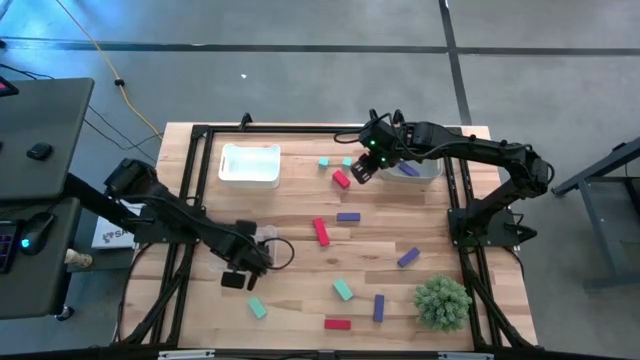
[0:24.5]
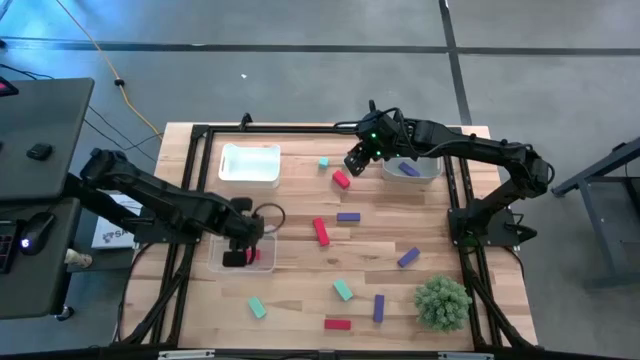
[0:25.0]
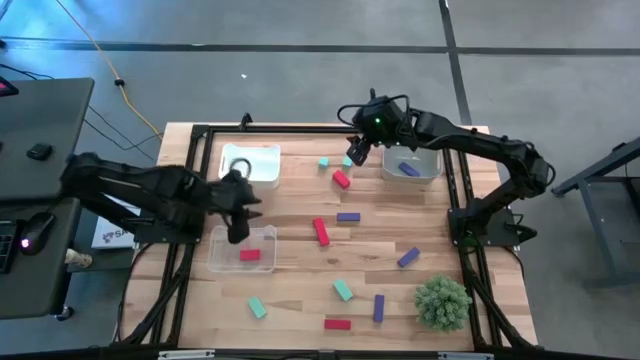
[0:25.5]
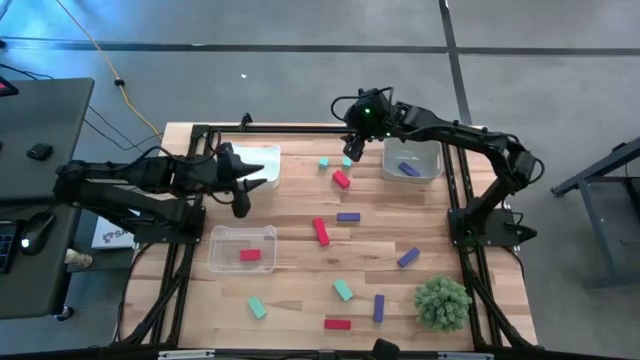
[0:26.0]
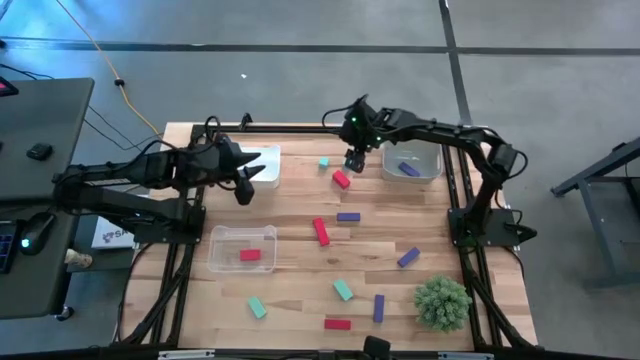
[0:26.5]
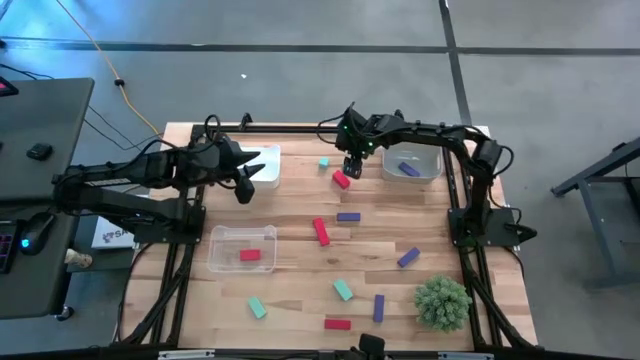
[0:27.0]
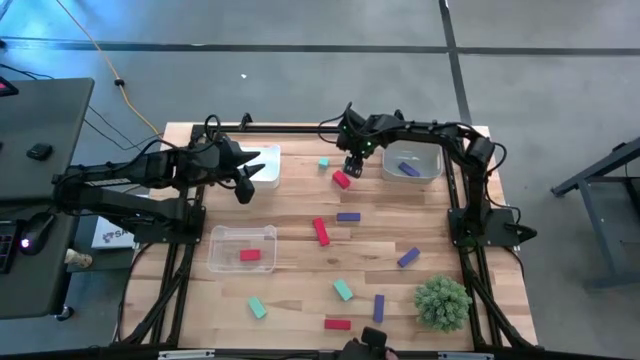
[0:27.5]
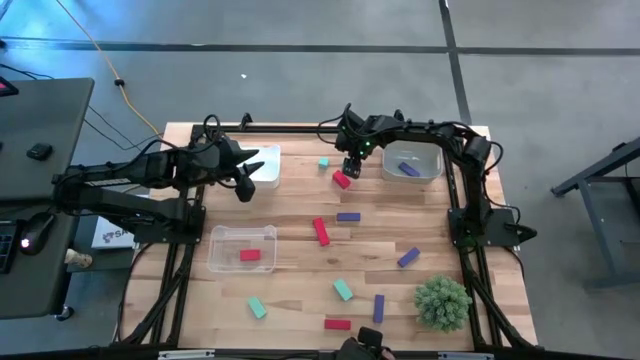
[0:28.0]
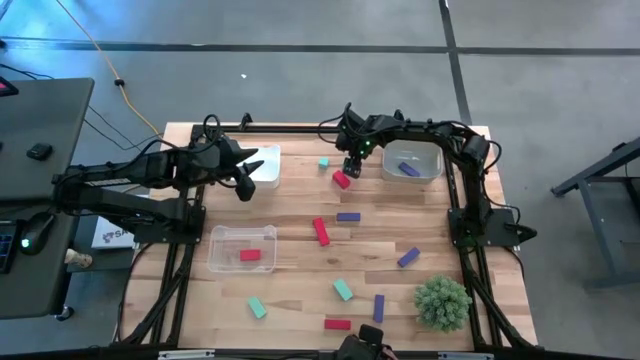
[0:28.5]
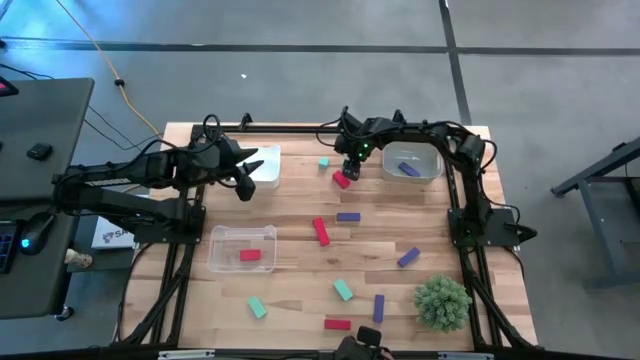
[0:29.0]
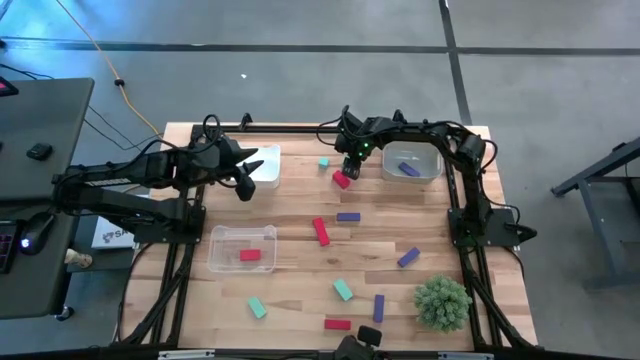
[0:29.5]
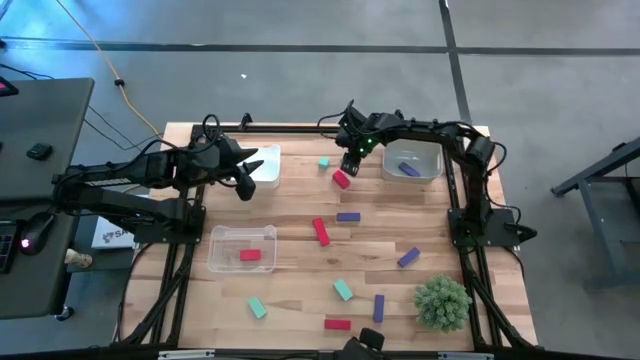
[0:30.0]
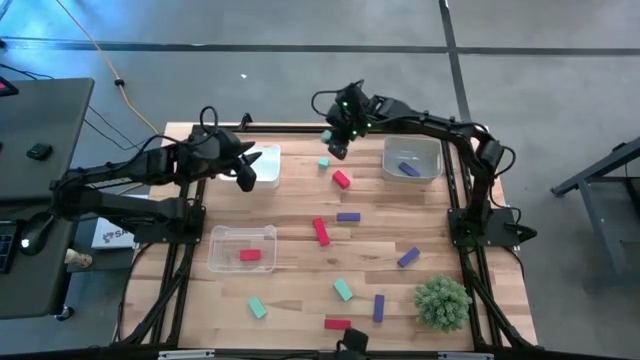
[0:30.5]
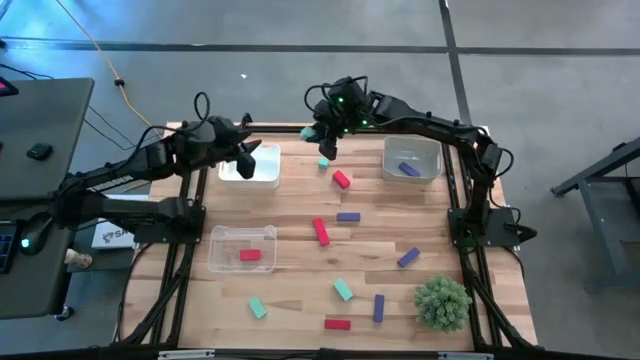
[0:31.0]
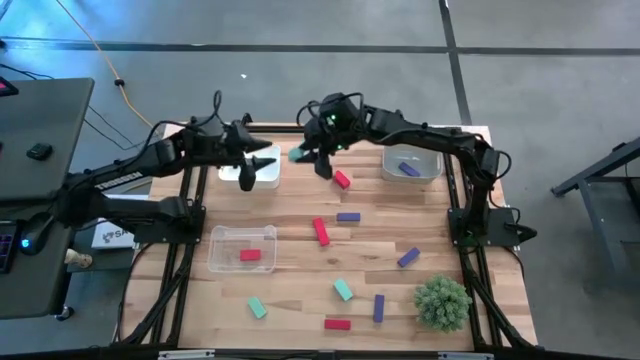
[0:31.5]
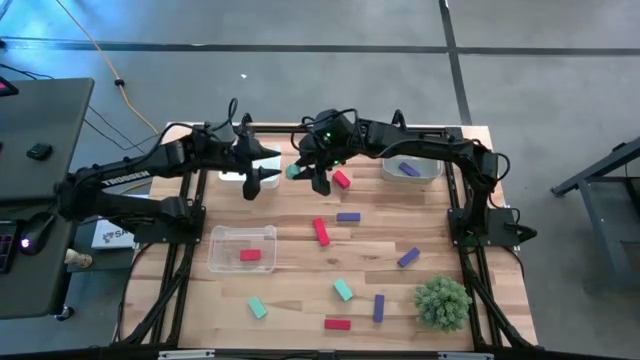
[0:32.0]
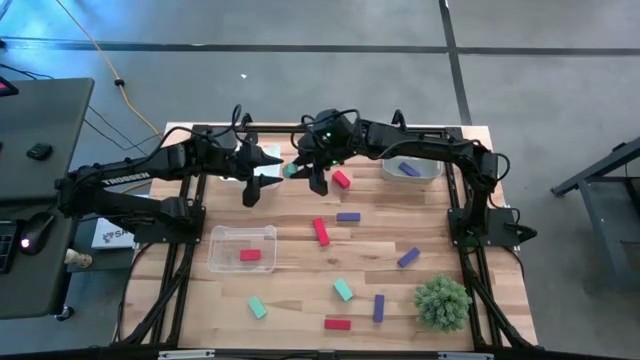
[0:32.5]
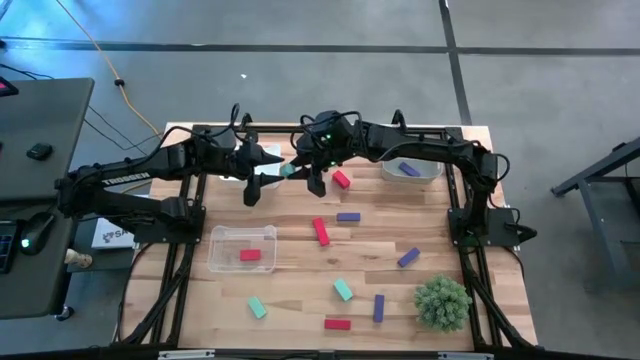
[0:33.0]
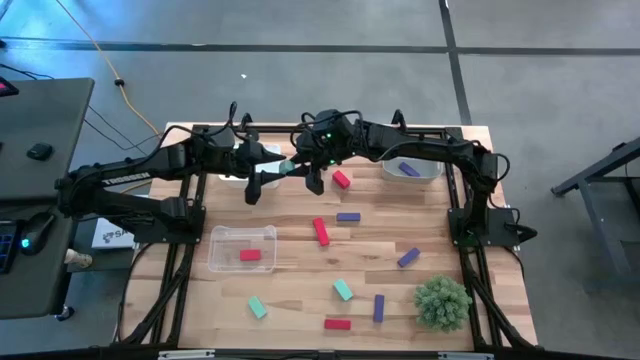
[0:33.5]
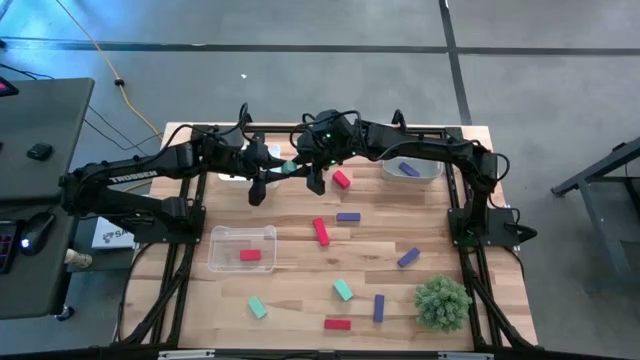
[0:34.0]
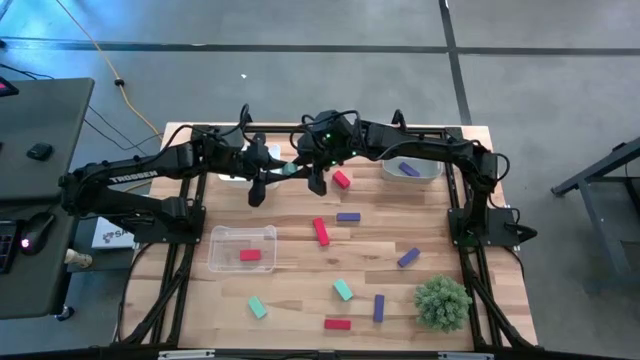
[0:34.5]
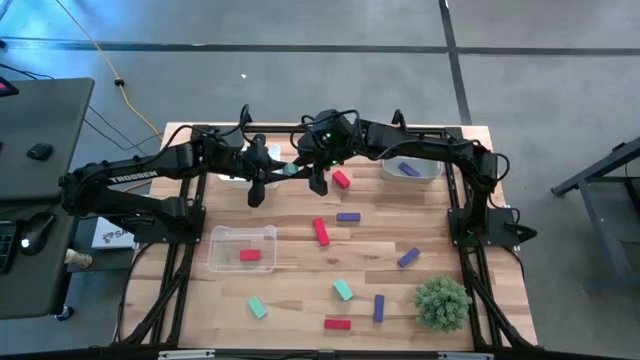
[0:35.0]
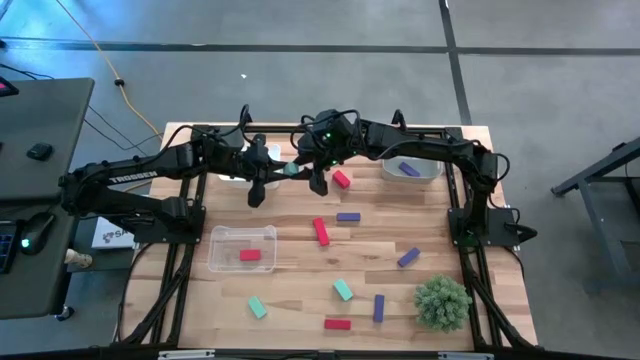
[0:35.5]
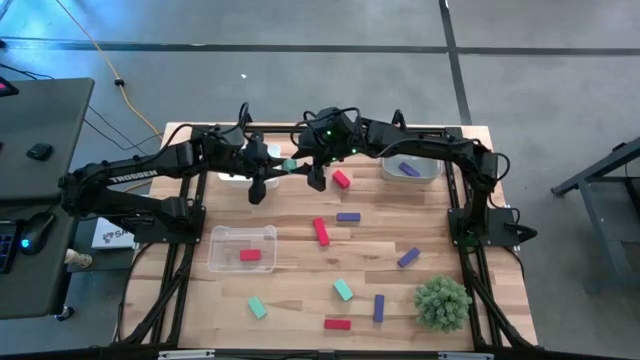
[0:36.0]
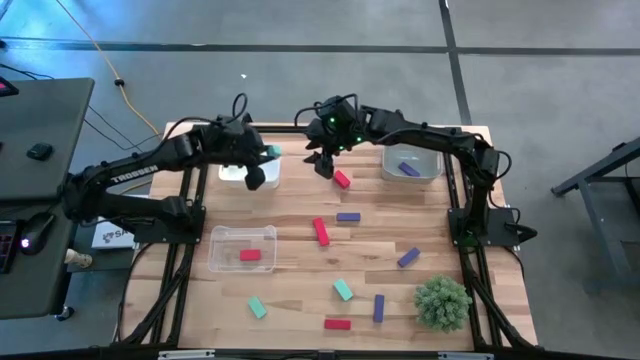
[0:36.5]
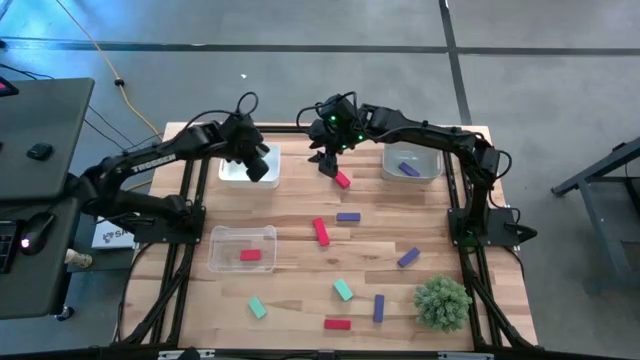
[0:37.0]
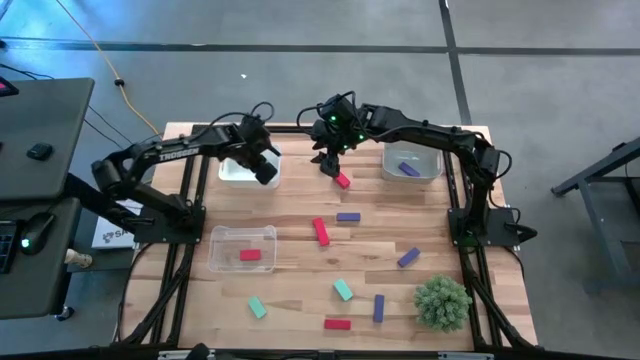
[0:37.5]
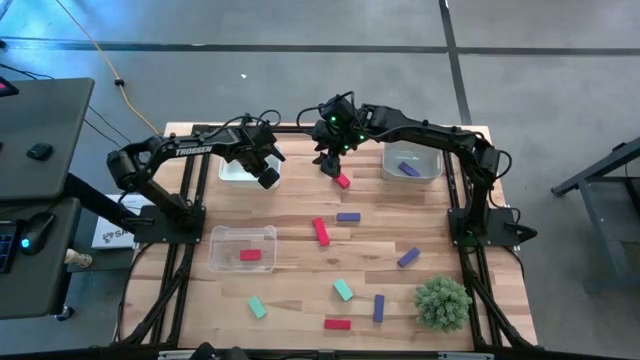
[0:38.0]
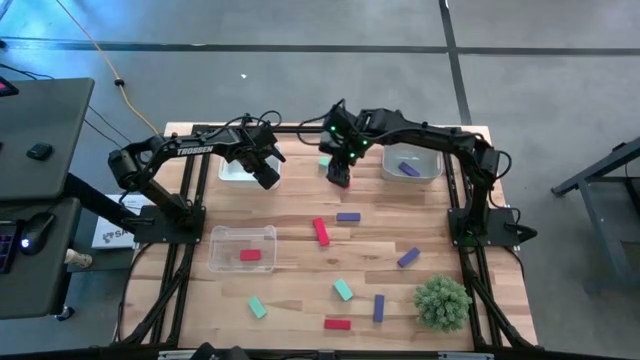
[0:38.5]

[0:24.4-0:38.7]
Task: Sort & place blocks by color
Put the top right light blue block into the white bin

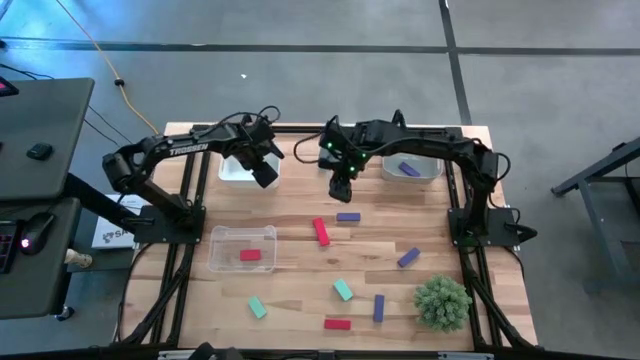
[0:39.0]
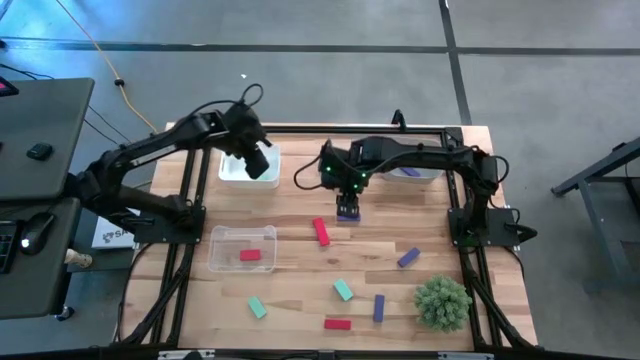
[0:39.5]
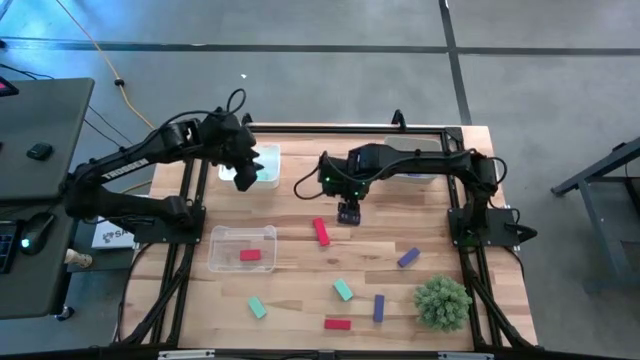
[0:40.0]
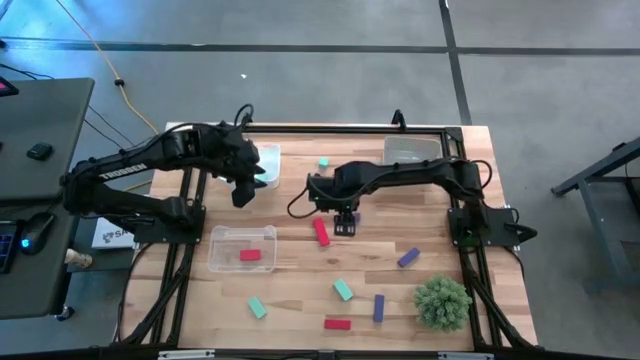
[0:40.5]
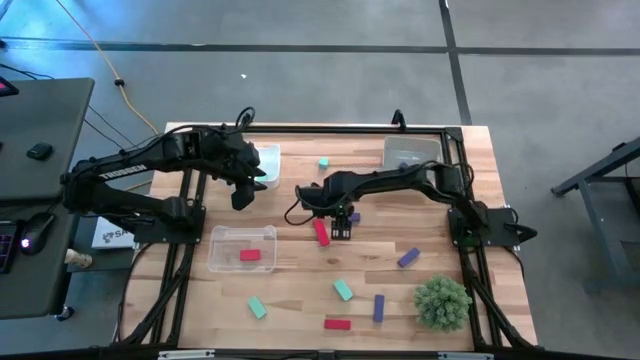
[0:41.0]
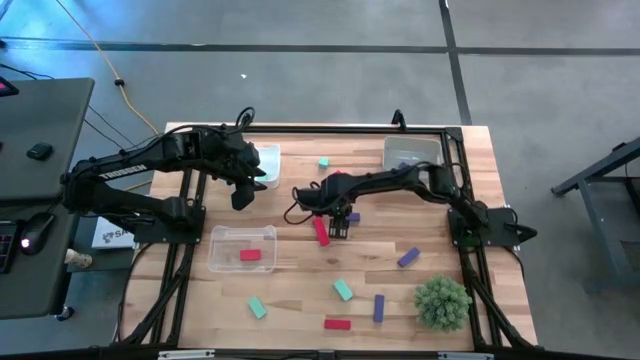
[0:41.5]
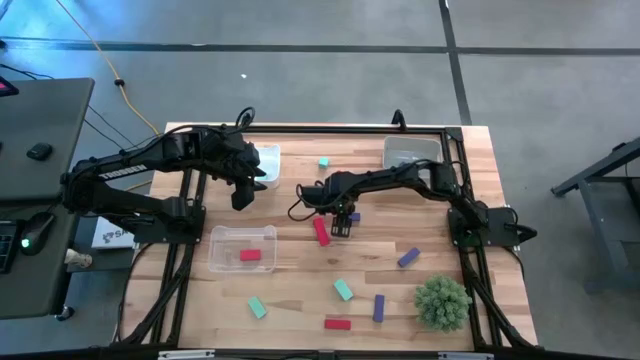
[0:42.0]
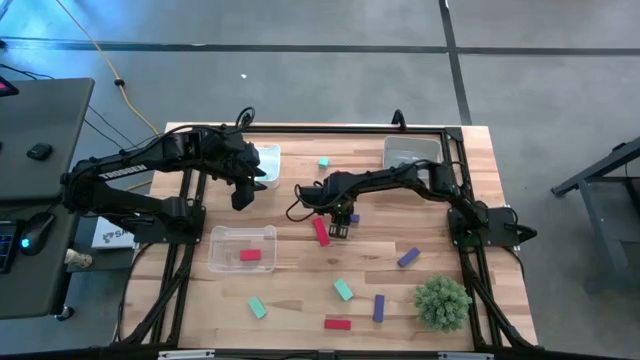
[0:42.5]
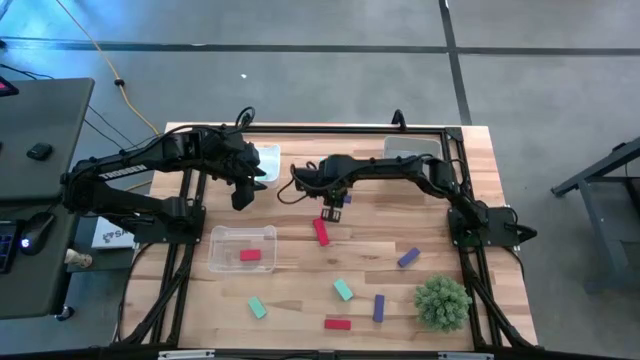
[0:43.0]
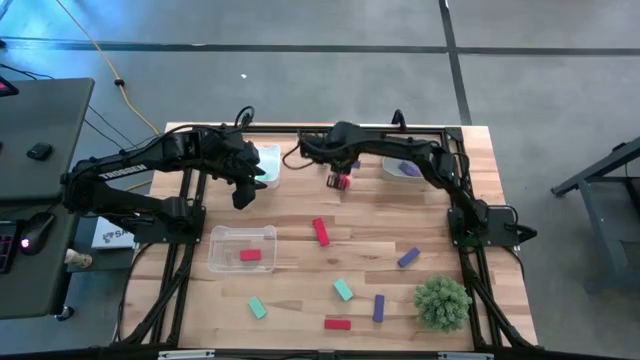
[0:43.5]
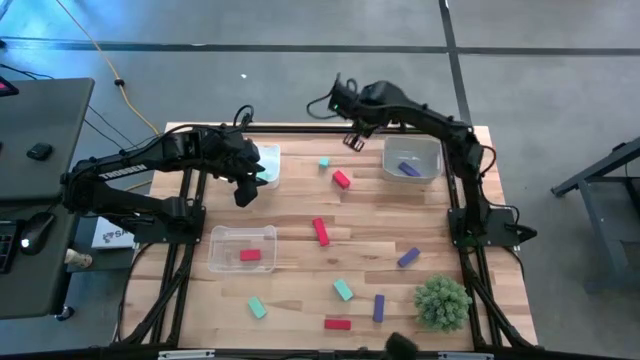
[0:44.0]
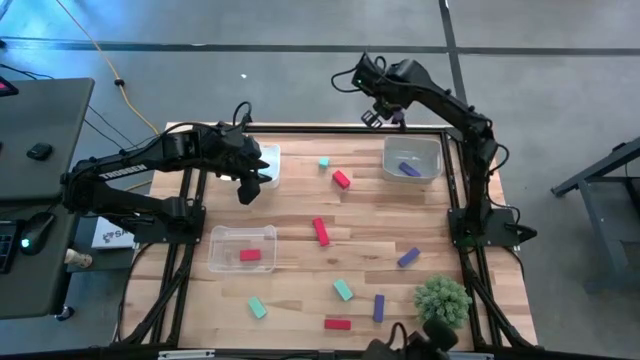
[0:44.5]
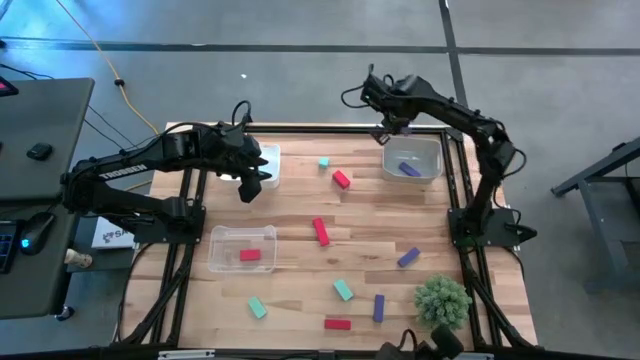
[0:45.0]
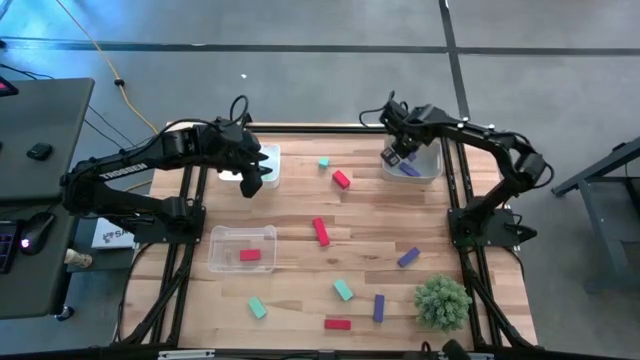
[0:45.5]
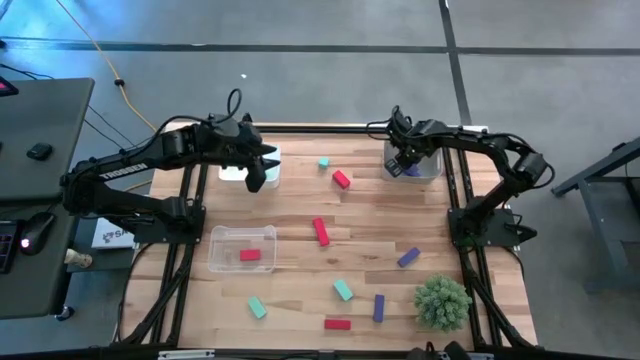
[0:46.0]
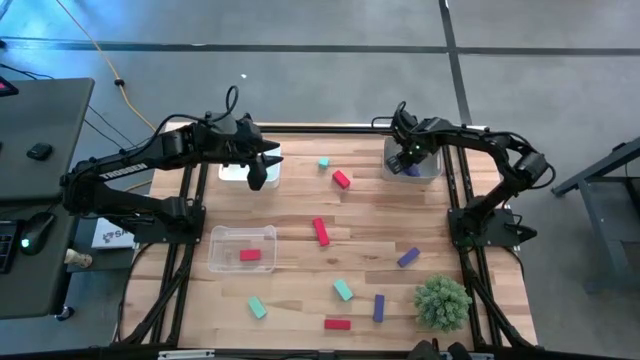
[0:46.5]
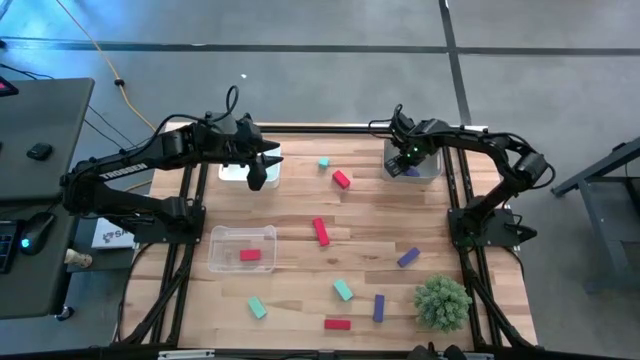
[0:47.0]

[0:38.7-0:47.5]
Put the top left violet block into the gray bin
